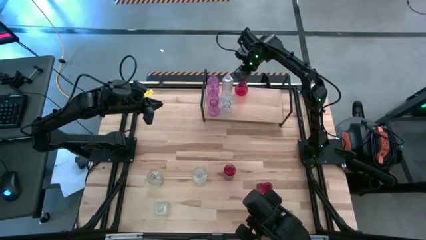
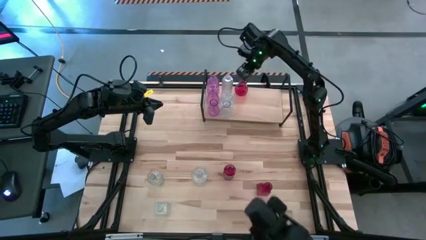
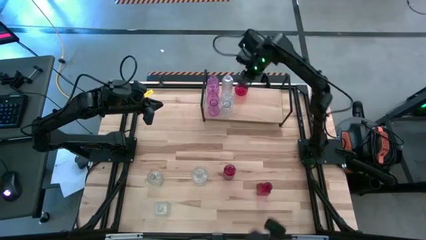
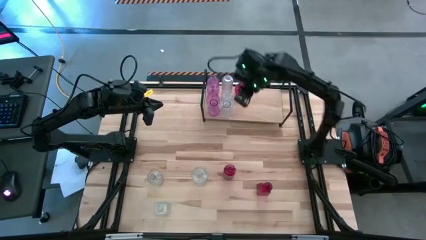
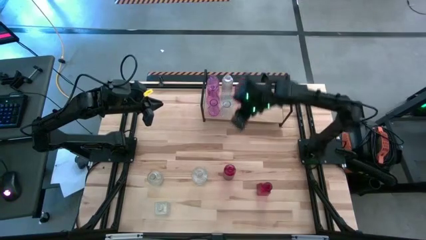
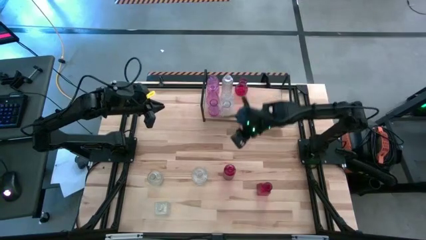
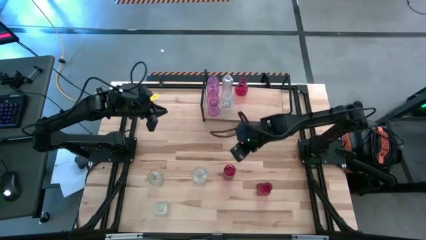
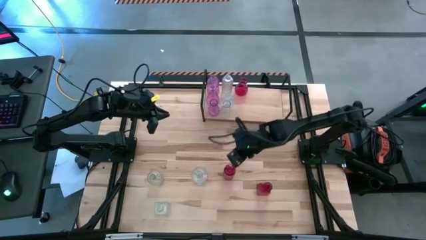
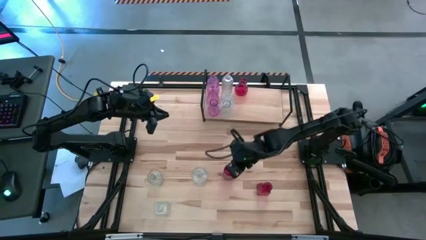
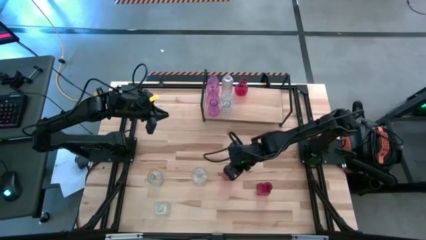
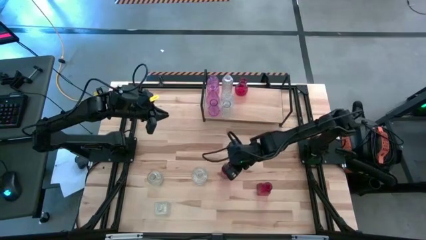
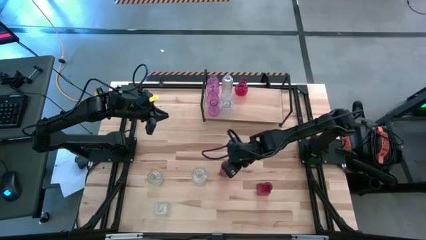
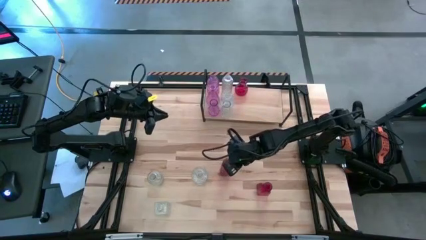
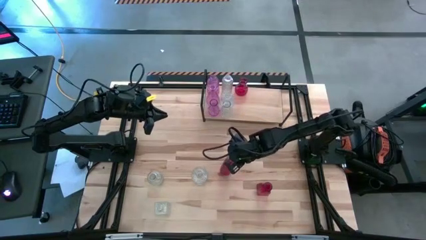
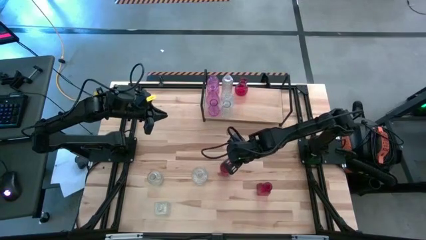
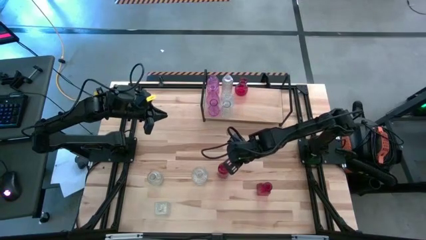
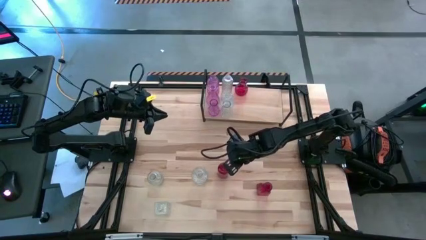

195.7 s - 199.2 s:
Task: sort vases onto shelf
Align the red vase with the other red vase on the shelf

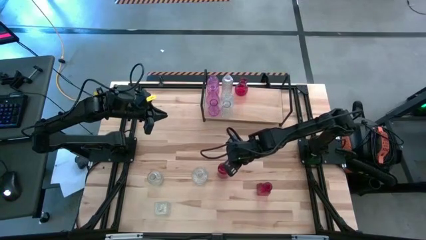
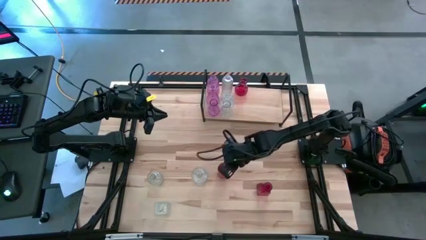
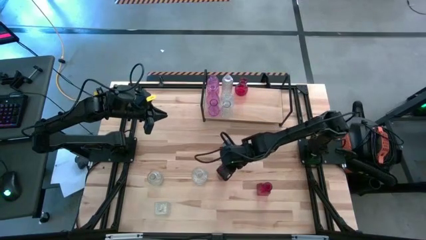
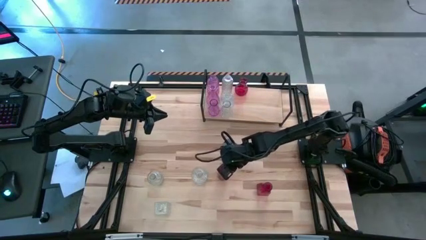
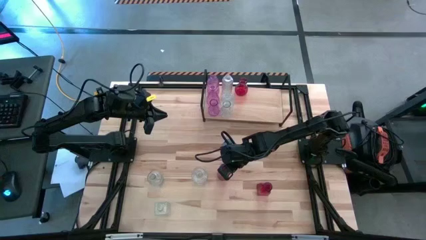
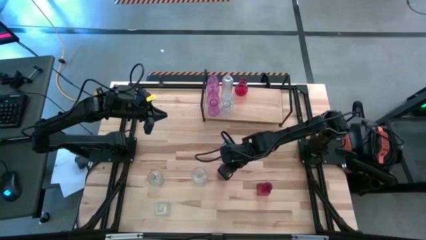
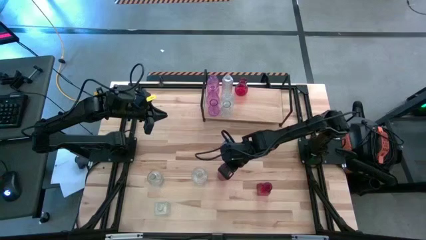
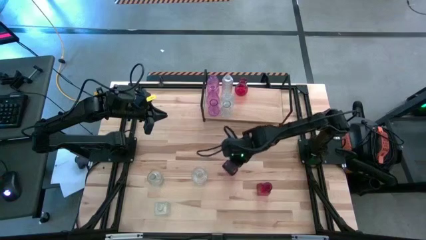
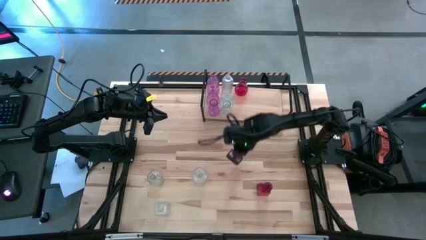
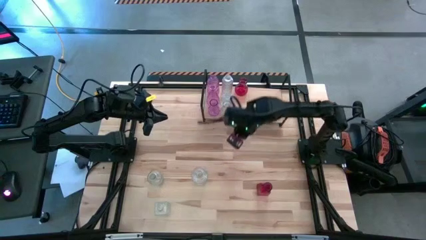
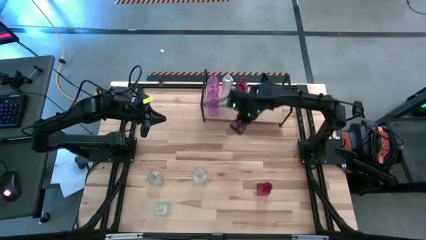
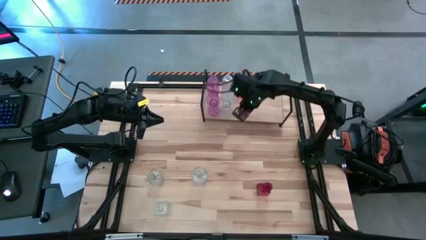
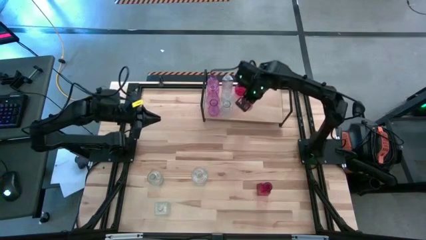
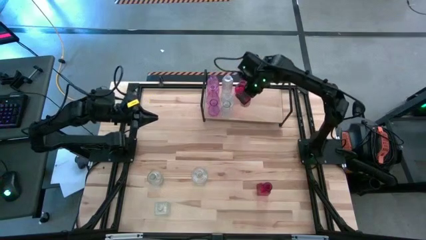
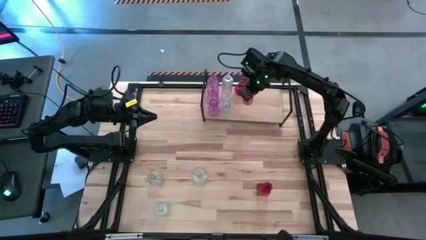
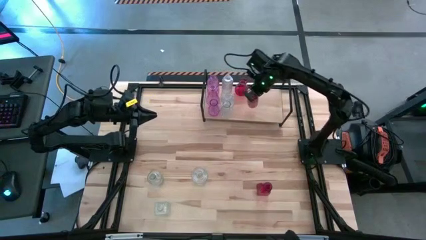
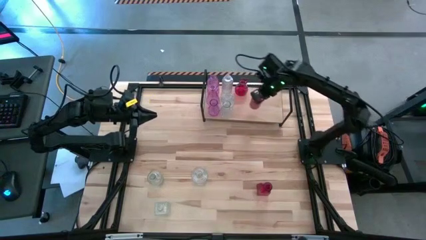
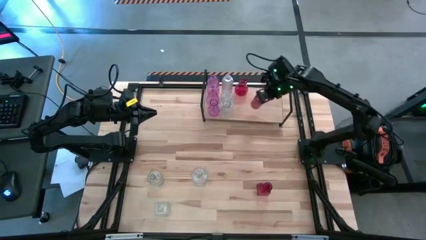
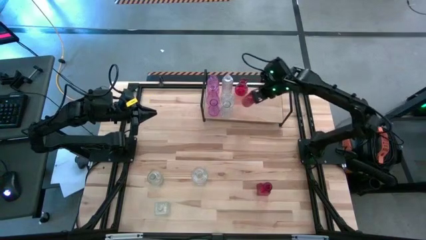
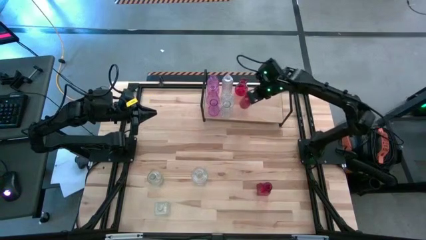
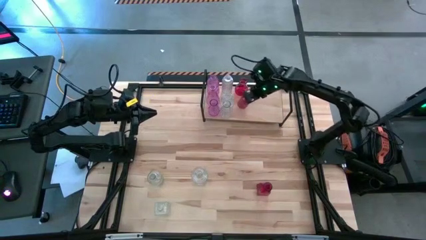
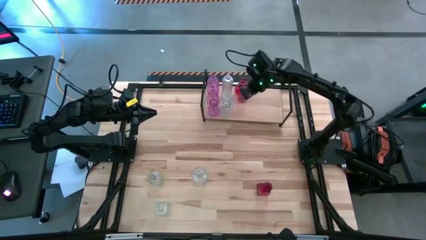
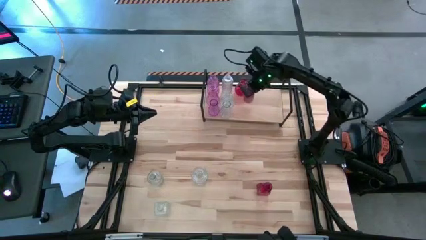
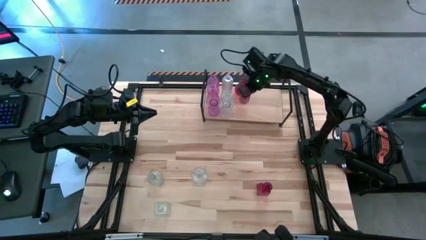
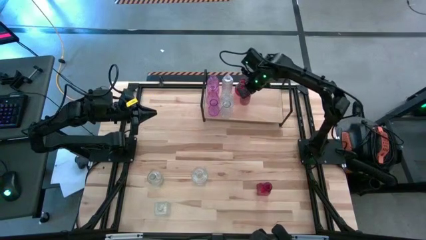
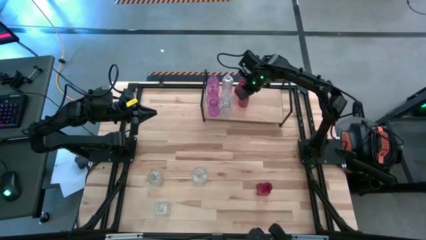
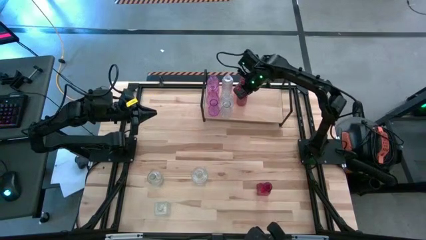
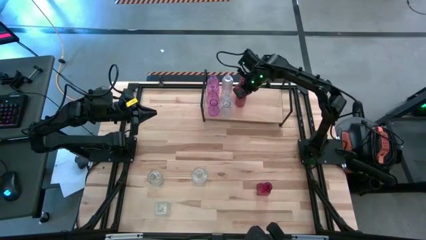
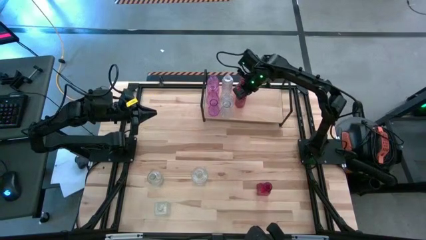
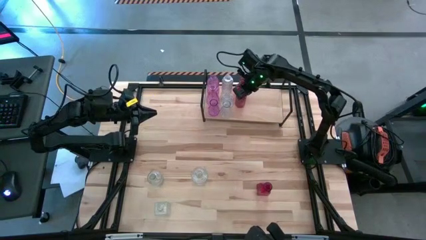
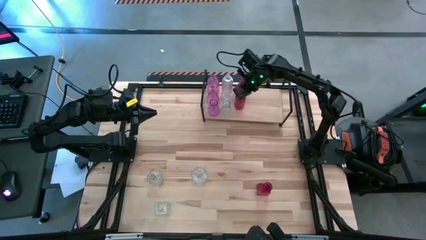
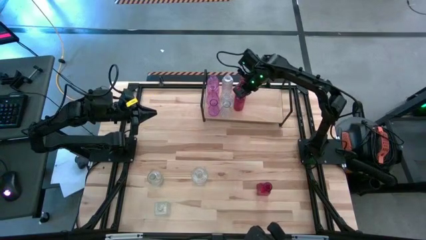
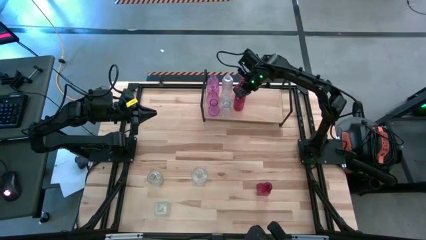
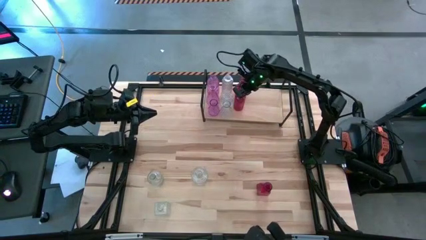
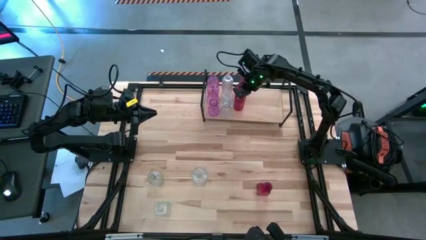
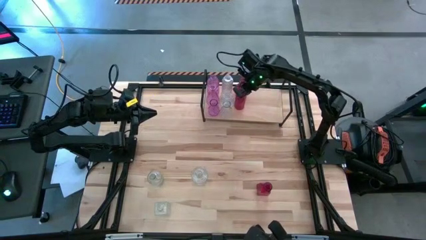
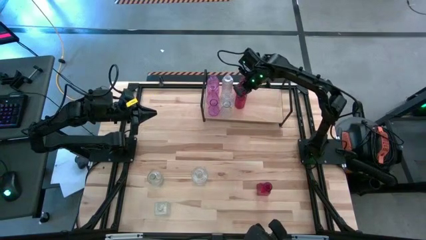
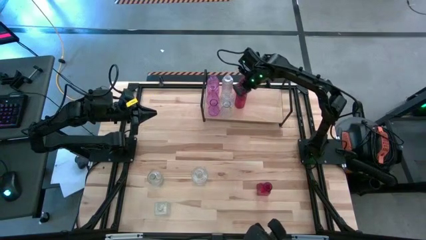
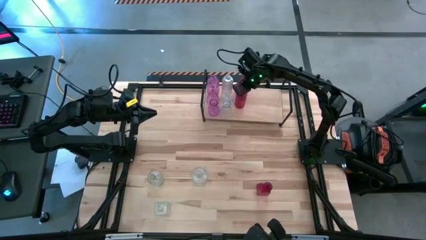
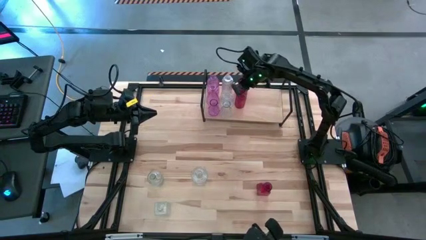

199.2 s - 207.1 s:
Align the red vase with the other red vase on the shelf
